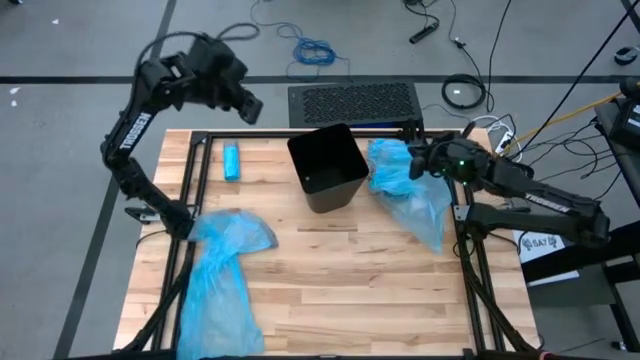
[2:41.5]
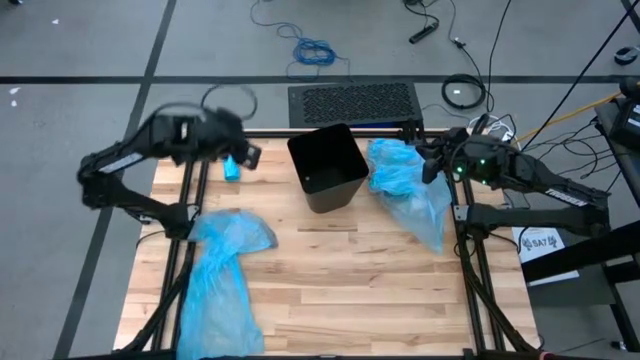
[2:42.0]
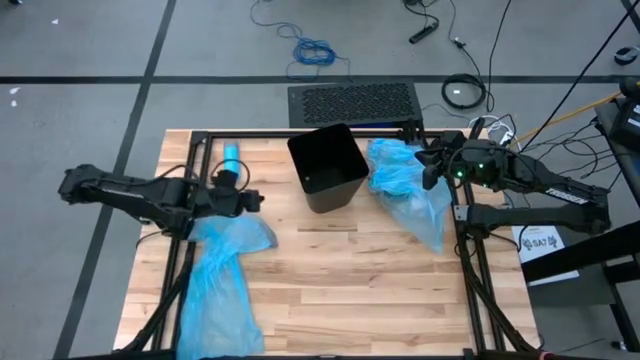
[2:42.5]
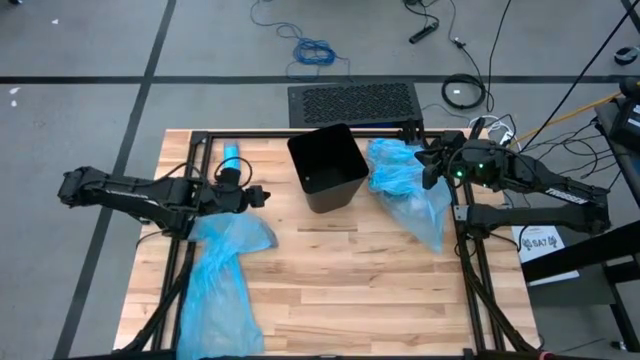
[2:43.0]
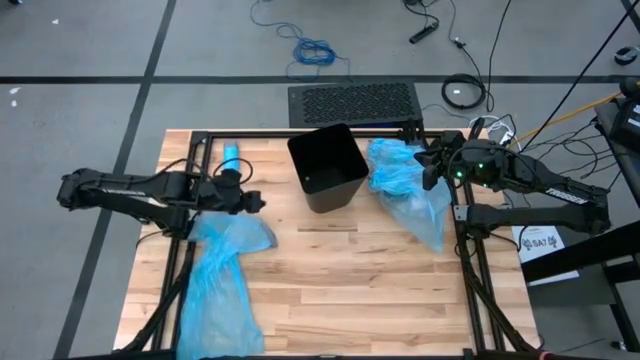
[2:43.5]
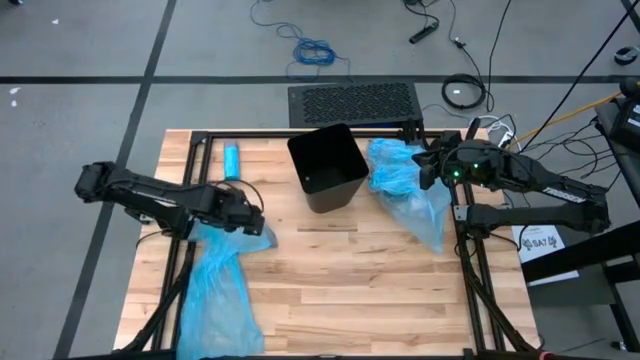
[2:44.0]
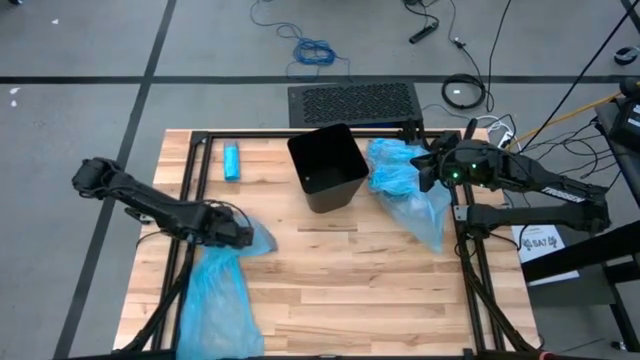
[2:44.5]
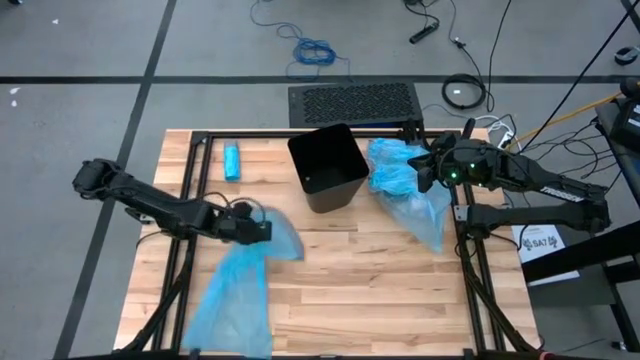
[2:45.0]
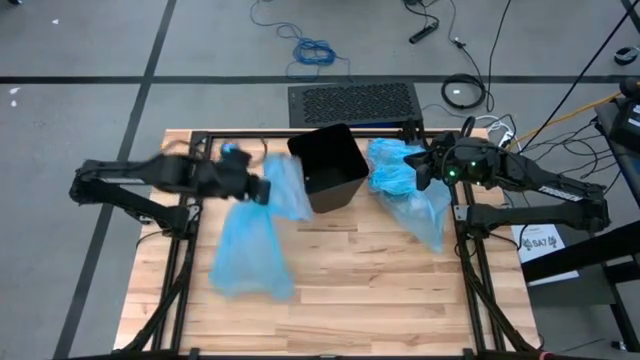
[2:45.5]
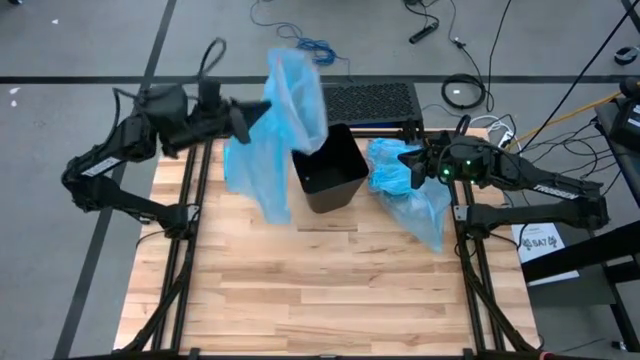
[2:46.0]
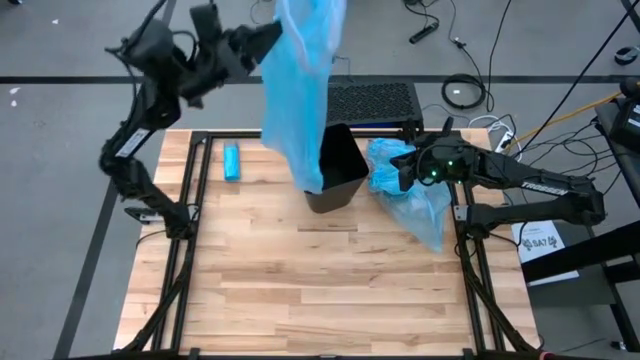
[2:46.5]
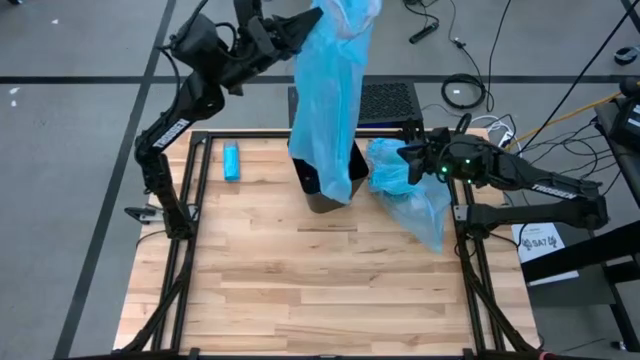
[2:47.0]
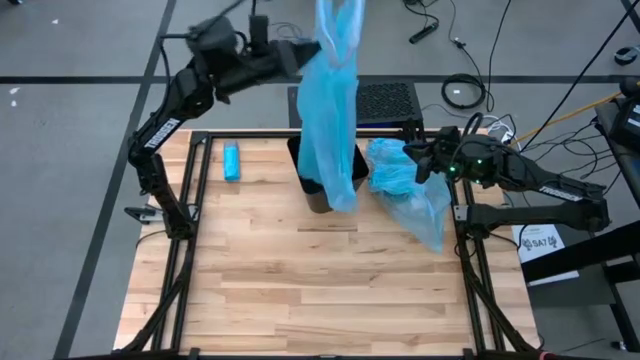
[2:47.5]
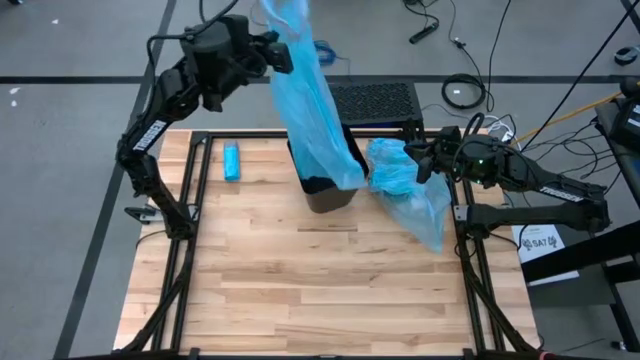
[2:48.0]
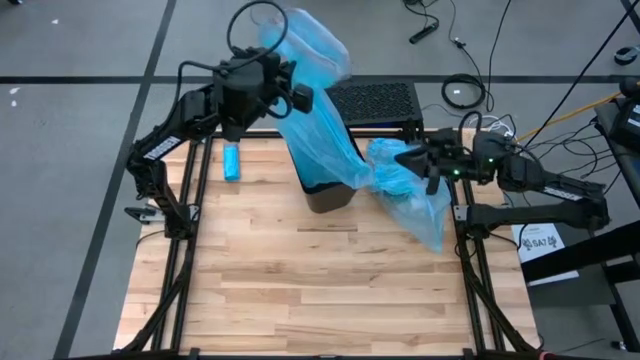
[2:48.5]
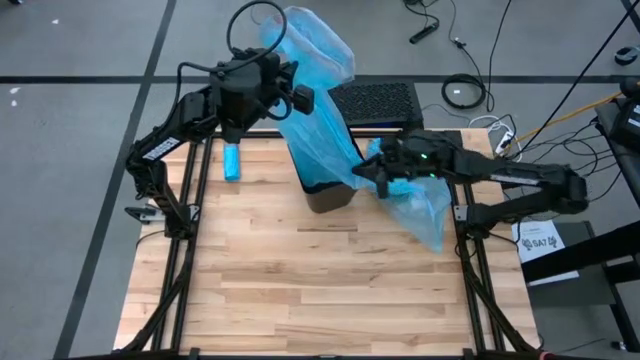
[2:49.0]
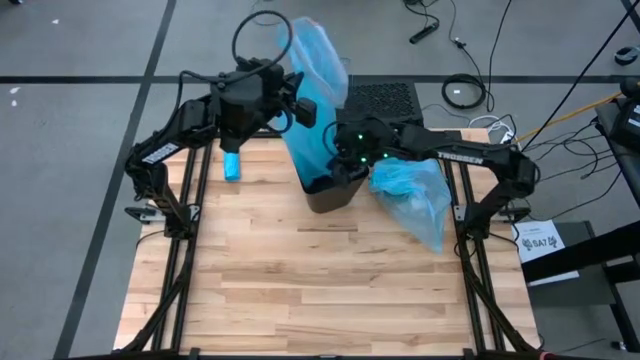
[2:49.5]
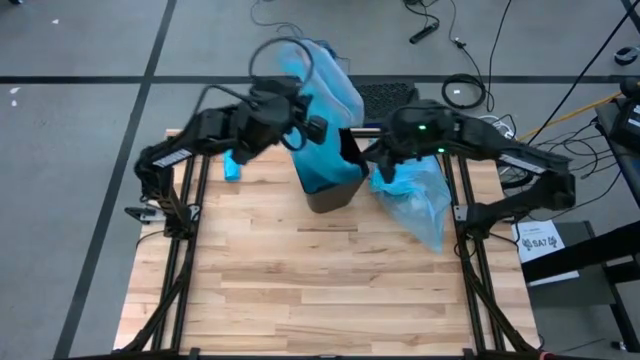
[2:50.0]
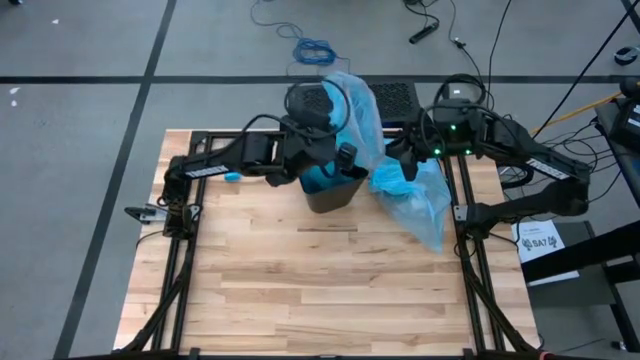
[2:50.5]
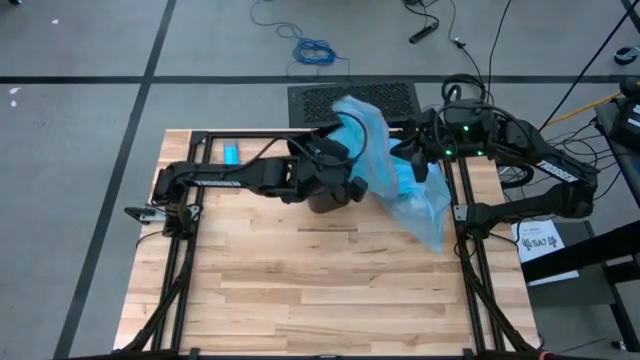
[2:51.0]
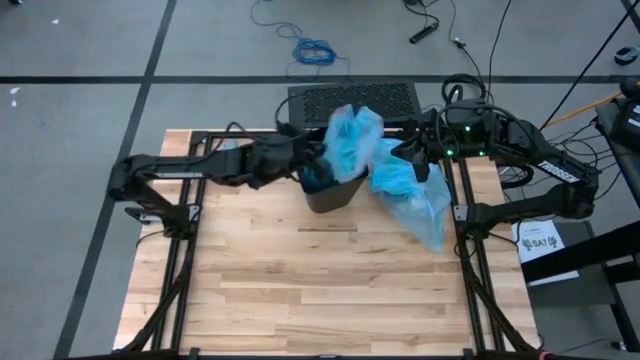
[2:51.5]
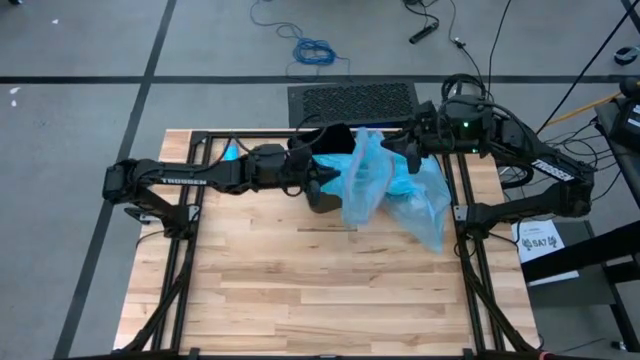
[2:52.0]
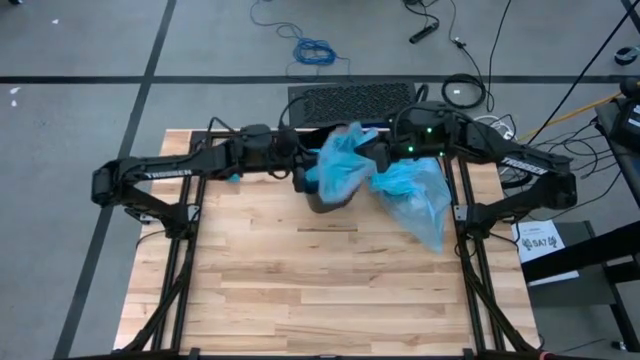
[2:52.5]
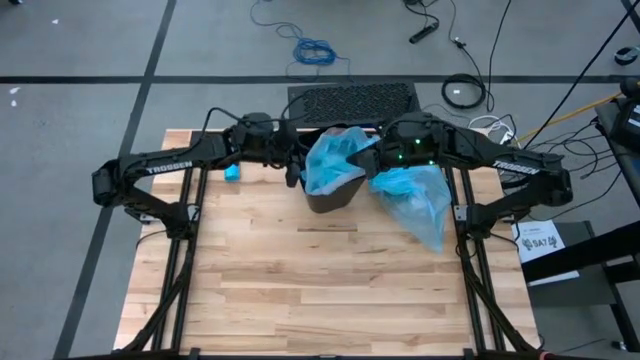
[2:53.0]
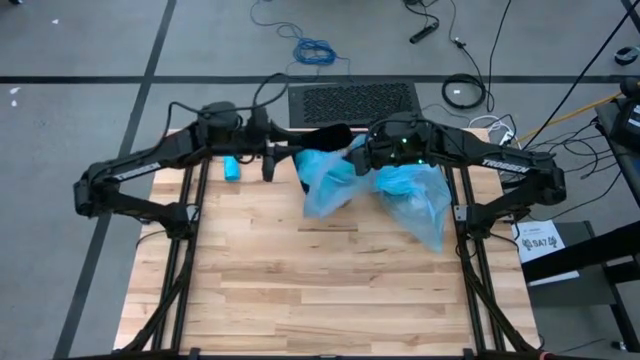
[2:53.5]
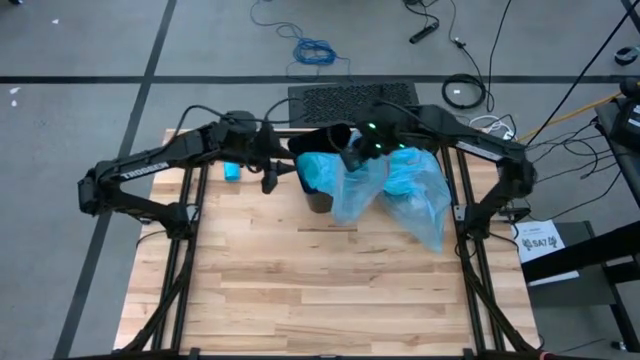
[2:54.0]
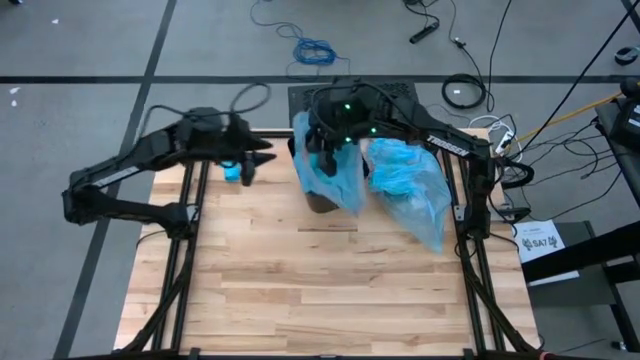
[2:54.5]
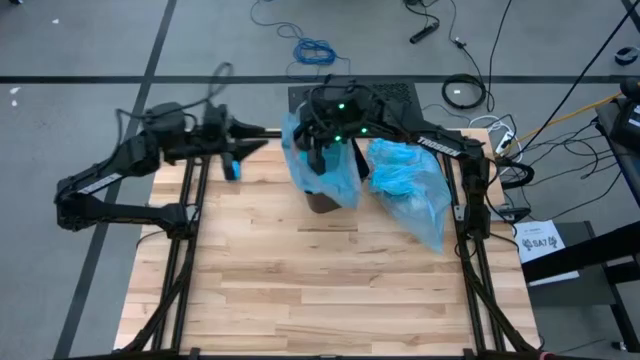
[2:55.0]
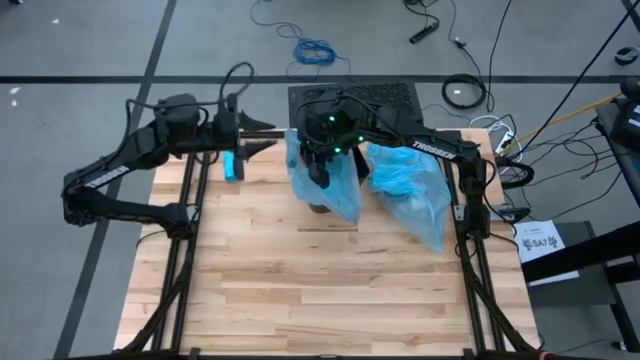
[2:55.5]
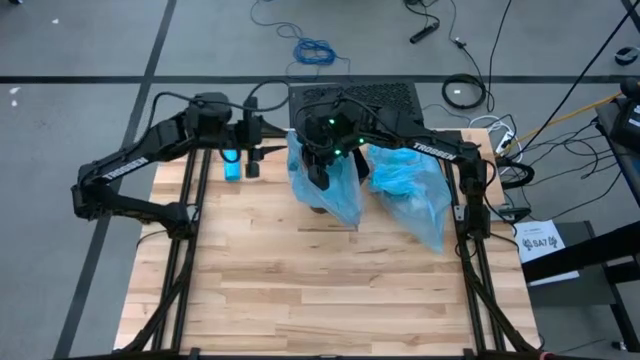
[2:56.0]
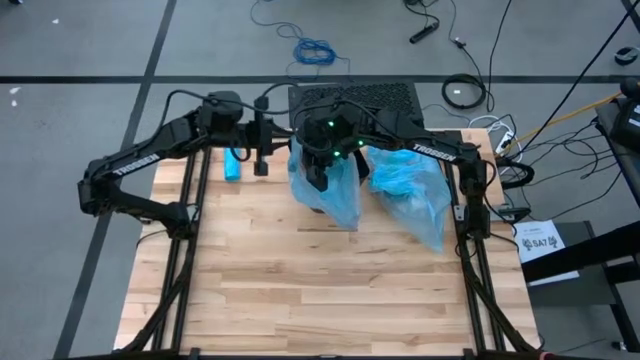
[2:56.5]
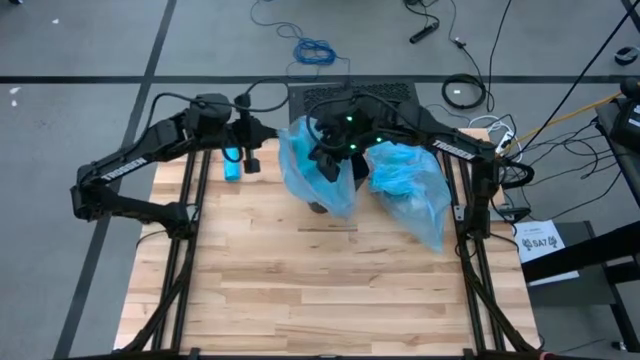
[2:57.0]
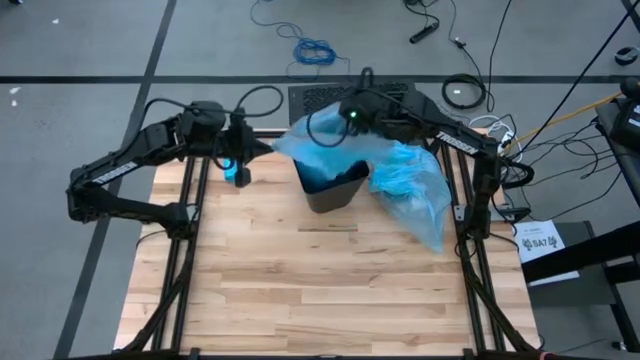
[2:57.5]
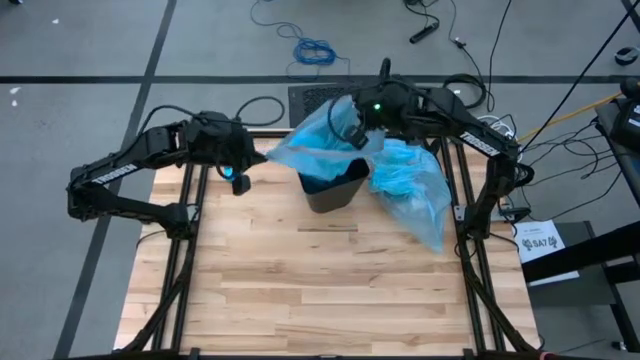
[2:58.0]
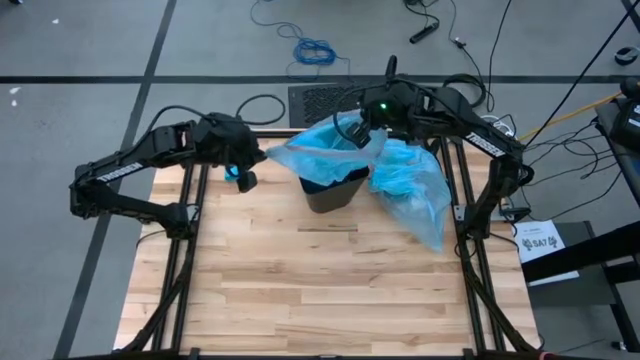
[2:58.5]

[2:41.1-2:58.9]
Task: place trash/remove bag and relplace
Insert the blue trash bag into the trash bin

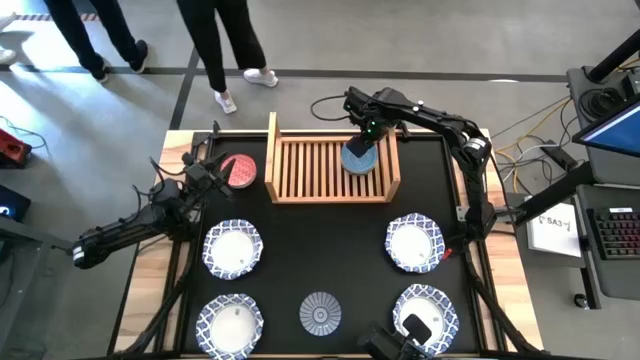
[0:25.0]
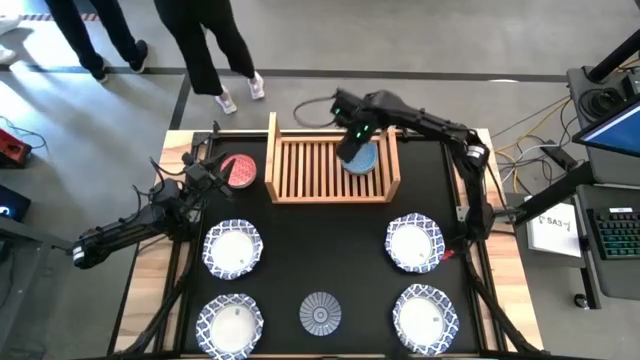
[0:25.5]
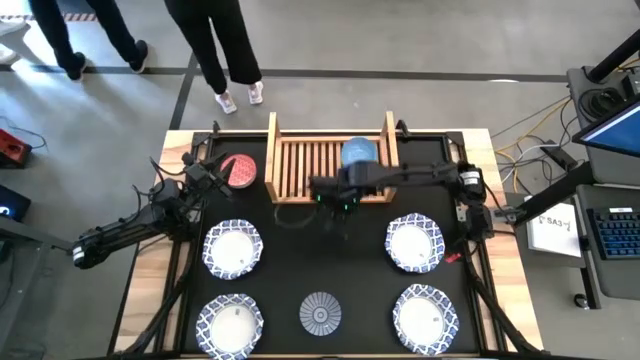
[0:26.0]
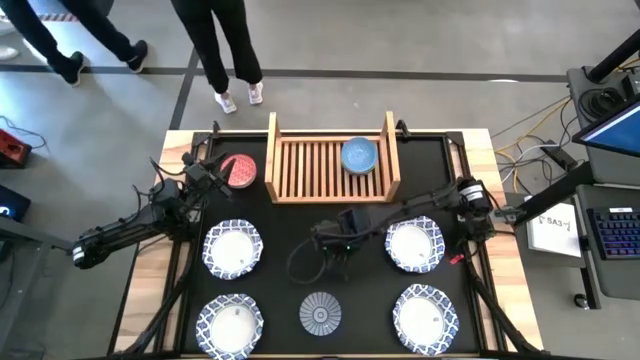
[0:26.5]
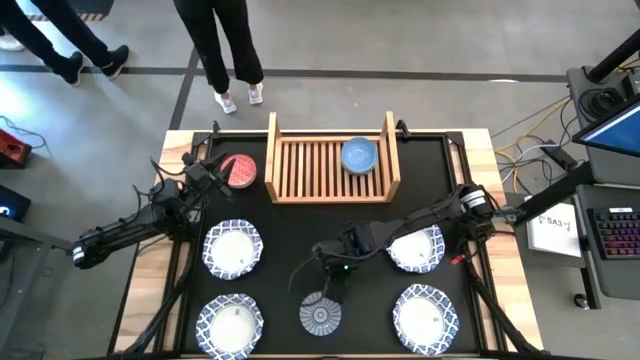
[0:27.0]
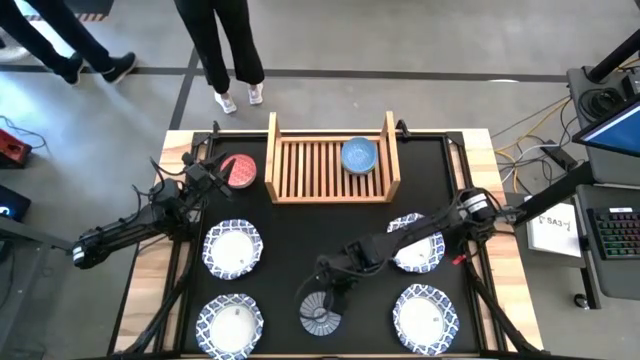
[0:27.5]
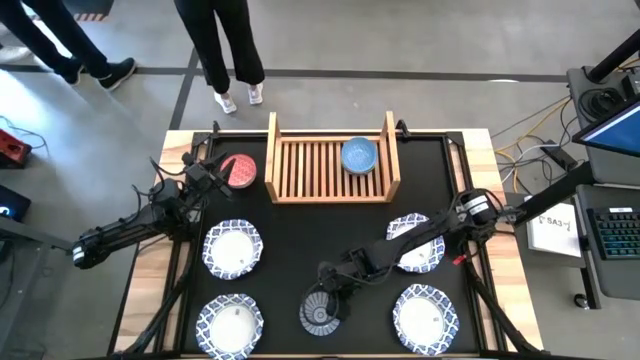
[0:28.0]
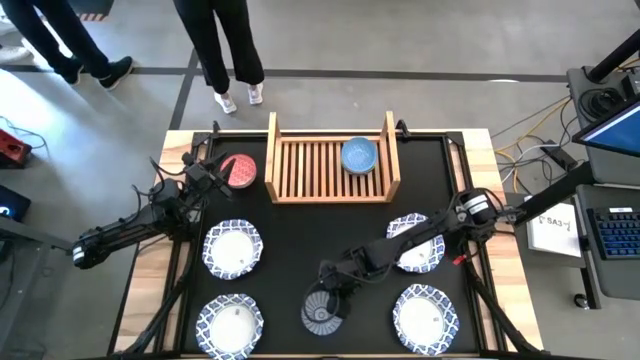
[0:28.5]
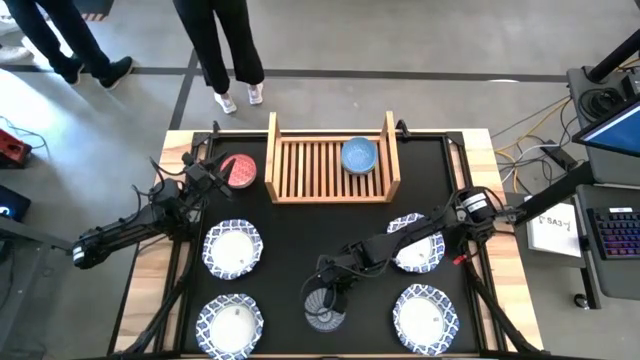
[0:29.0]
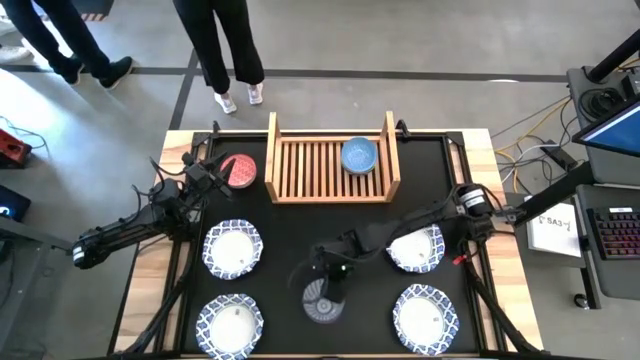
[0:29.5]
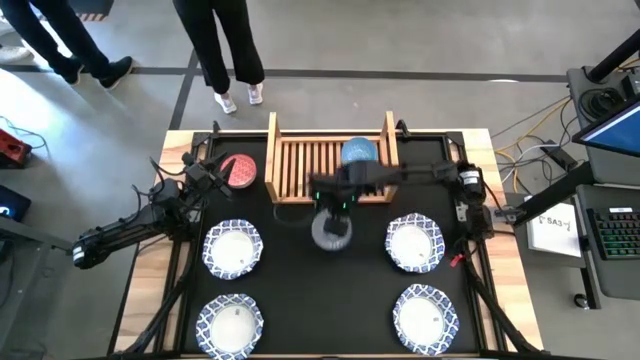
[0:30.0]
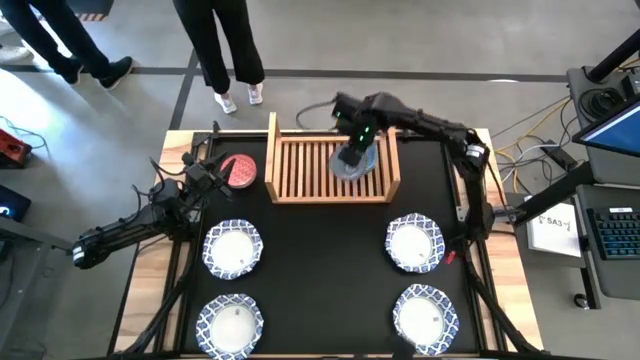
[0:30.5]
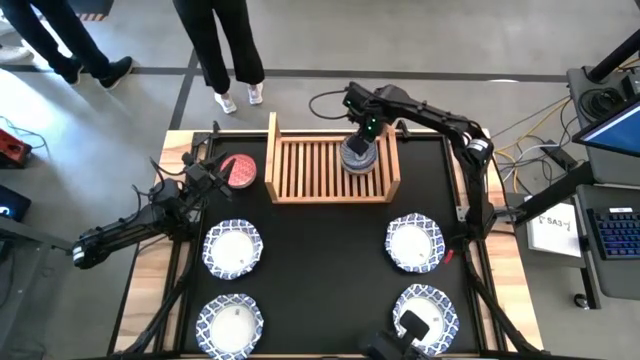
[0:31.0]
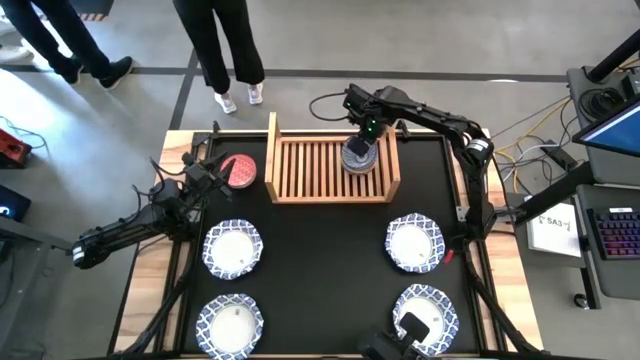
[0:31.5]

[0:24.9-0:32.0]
Task: Place and stack bowls onto a shelf
Stack the blue patterned bowl on top of the light blue patterned bowl on the shelf
